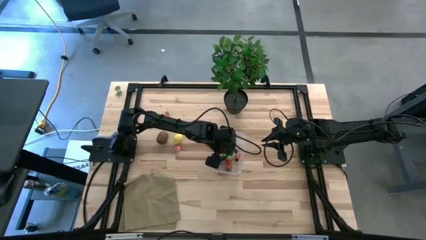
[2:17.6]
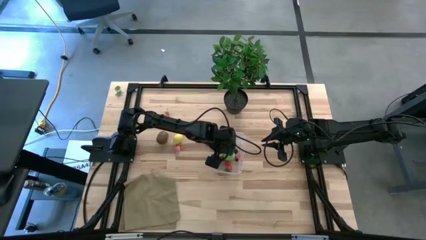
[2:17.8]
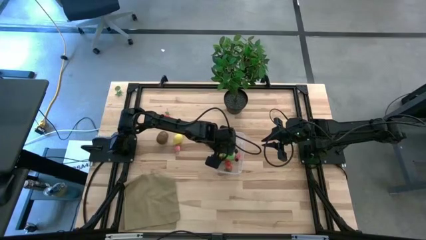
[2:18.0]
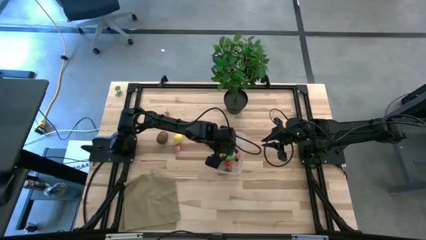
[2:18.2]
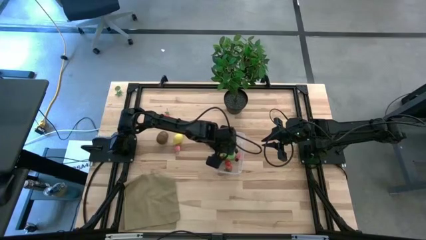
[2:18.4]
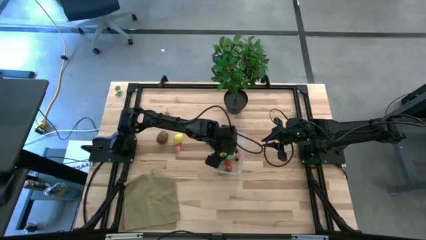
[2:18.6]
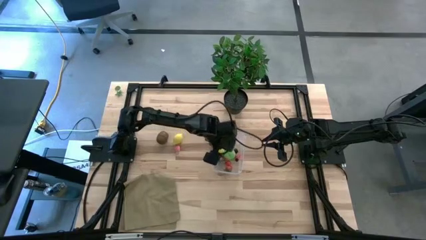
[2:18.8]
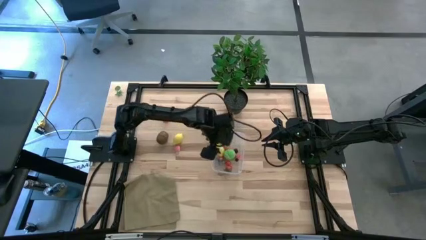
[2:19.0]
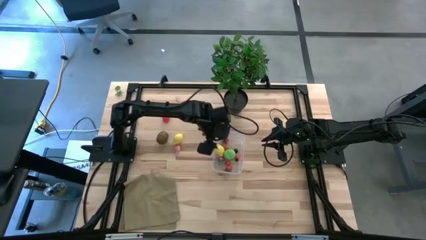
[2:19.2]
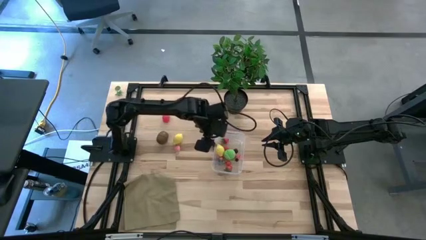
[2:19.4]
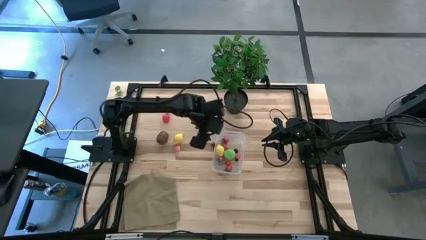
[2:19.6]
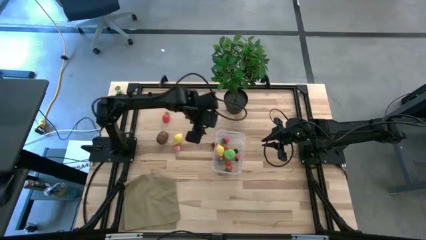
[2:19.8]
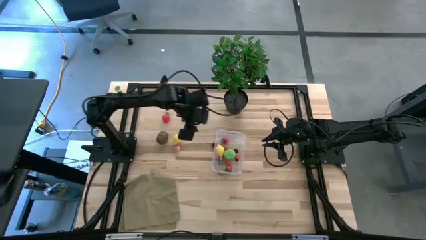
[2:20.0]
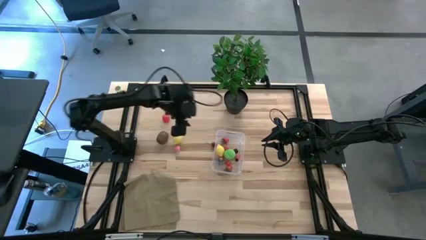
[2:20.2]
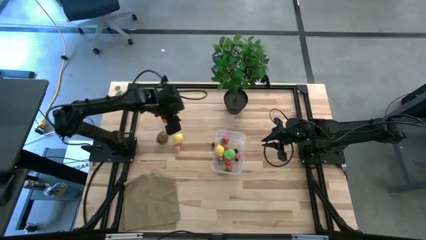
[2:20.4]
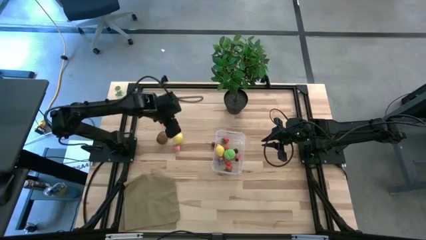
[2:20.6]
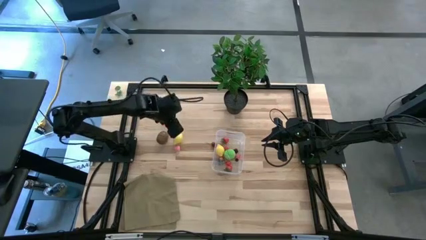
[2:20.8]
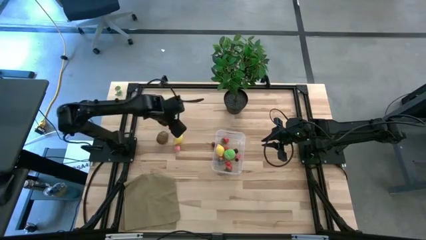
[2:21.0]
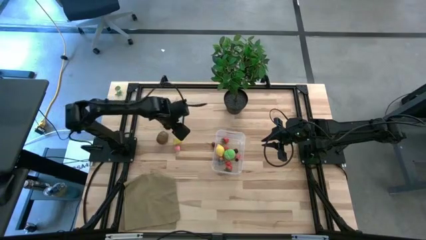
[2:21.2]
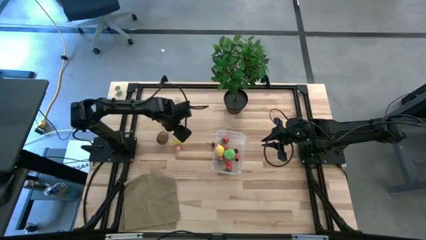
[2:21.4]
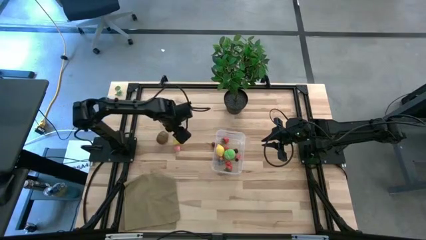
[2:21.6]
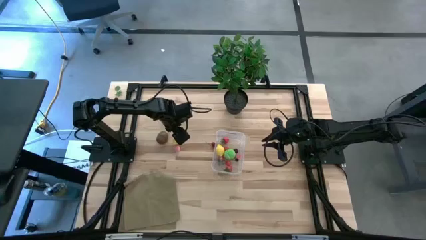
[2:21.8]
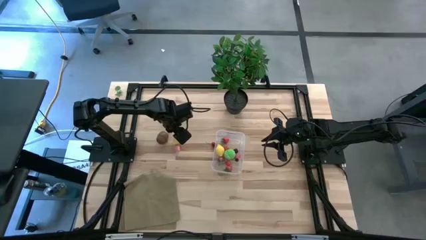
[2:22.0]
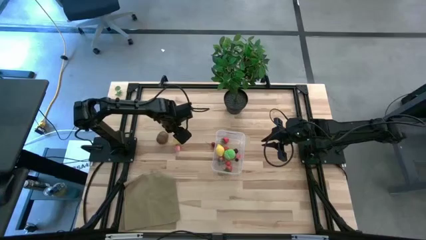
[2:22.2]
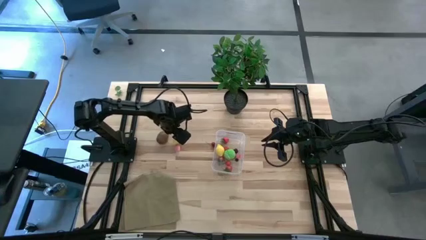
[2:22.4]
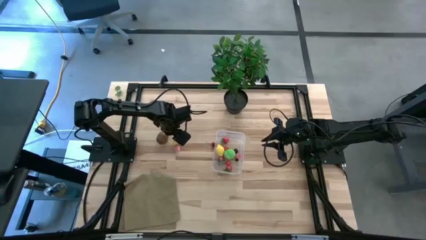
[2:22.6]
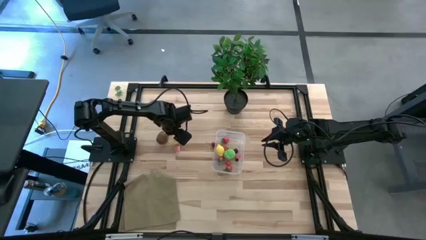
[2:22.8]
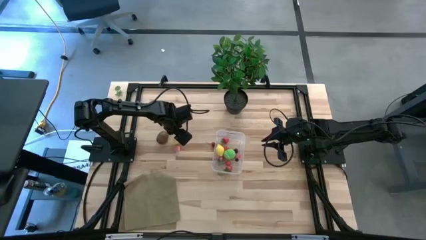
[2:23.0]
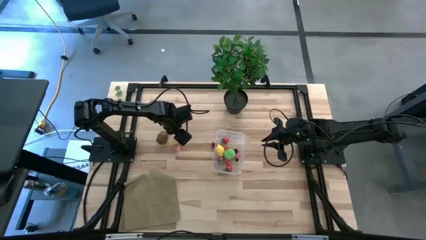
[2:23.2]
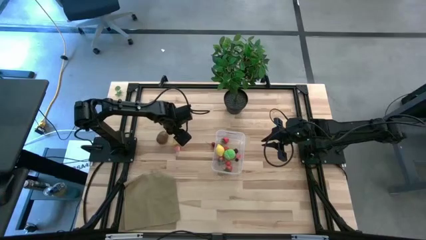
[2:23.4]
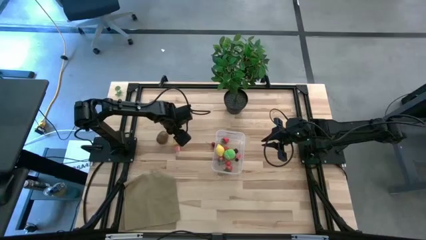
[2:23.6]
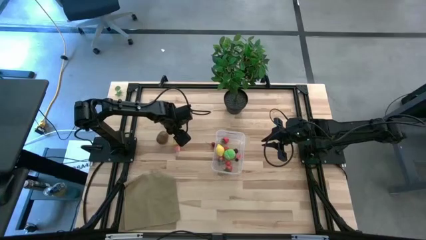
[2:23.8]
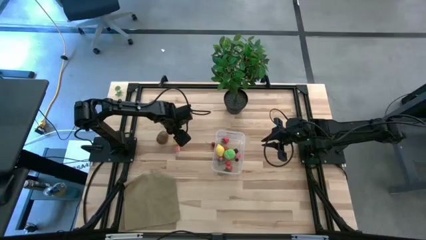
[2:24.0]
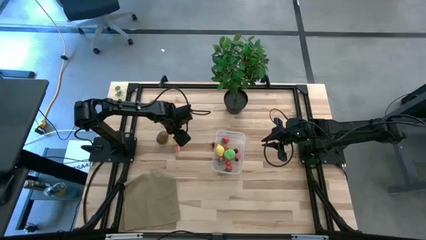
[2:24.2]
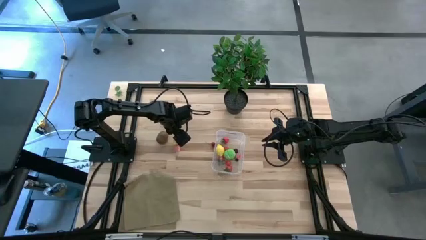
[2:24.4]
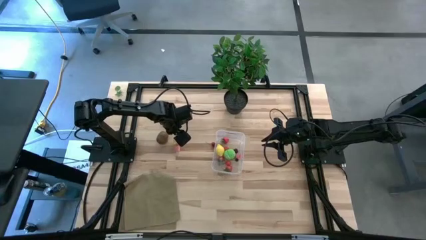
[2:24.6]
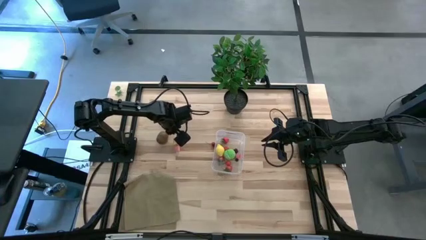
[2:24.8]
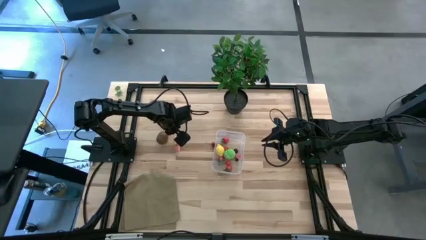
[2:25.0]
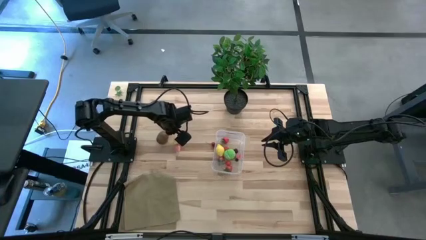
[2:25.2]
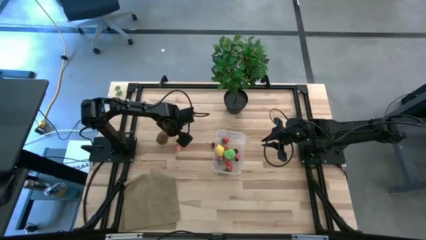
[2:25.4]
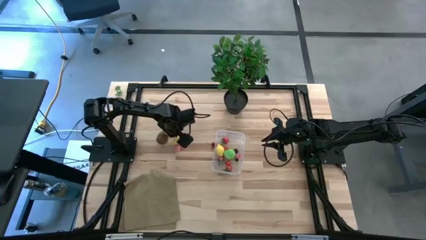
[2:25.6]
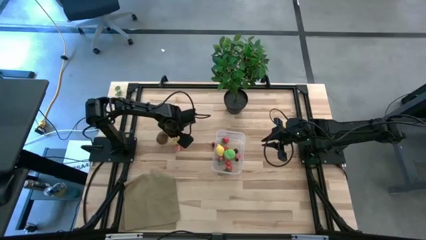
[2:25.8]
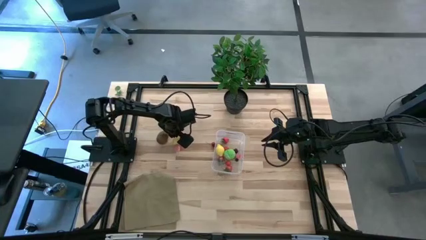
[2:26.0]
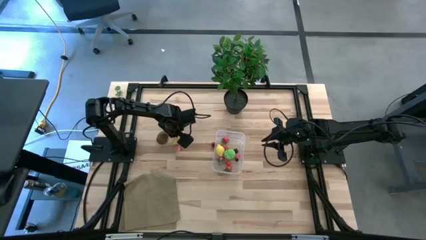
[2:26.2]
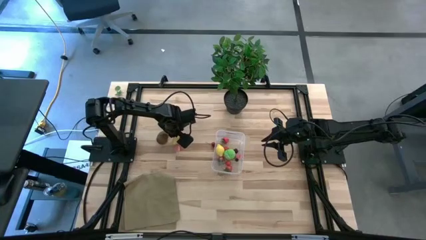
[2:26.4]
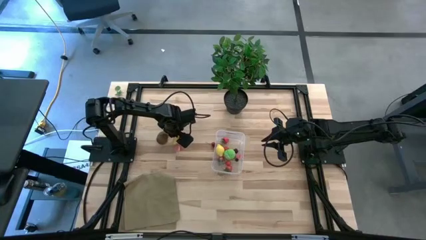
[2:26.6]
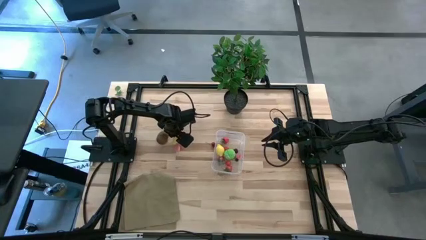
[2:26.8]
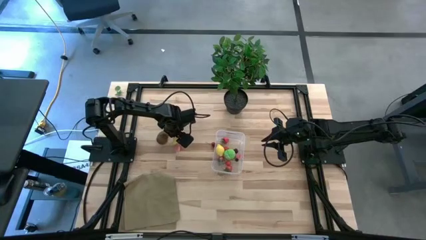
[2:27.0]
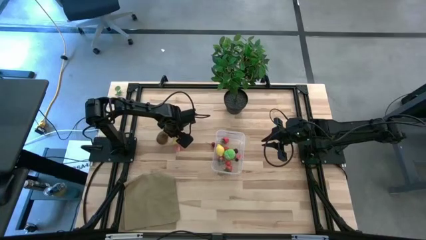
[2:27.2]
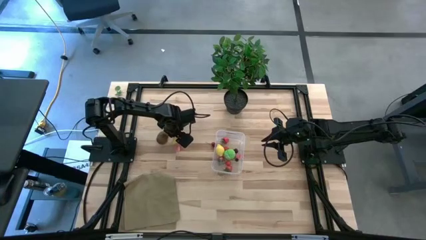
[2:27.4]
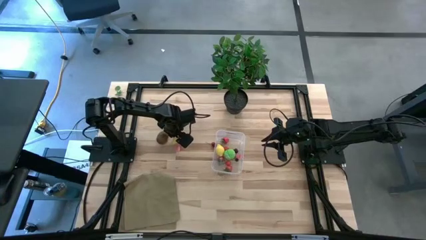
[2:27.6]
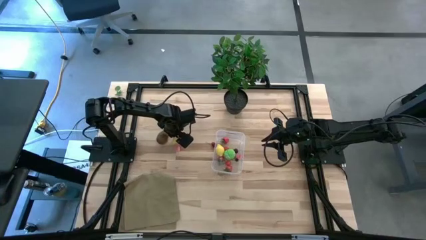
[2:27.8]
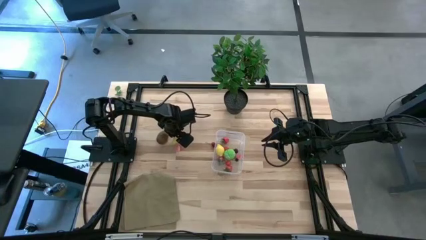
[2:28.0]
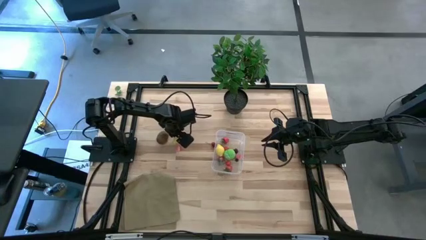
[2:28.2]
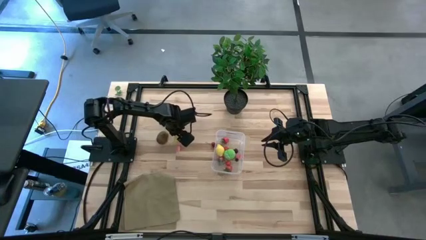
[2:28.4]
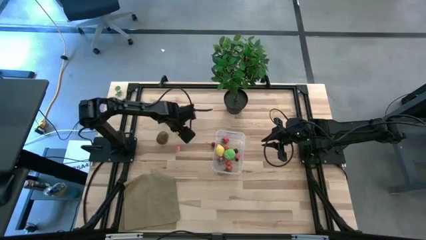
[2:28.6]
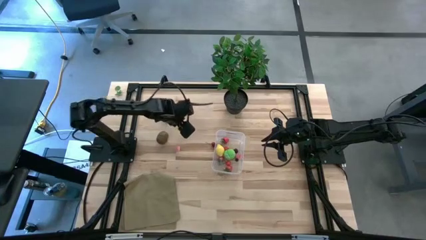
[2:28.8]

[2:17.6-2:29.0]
Task: Pick and placing Produce into tupperware
Put the lemon into the transparent container

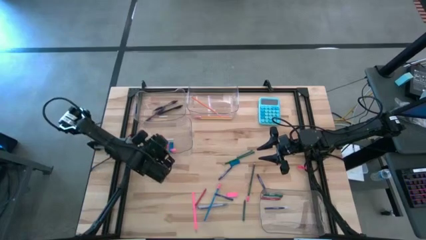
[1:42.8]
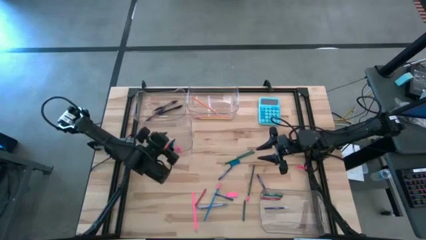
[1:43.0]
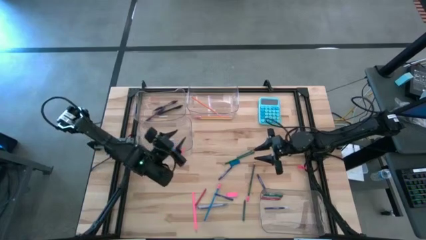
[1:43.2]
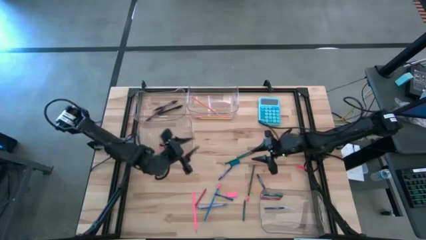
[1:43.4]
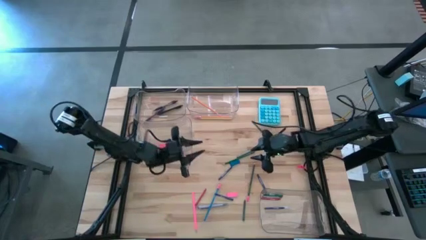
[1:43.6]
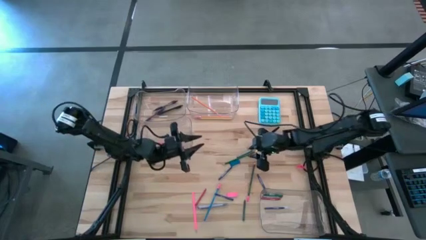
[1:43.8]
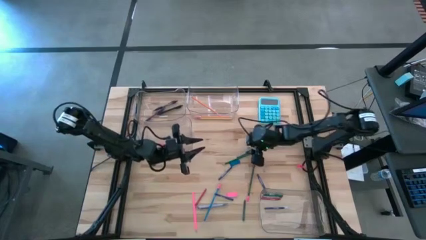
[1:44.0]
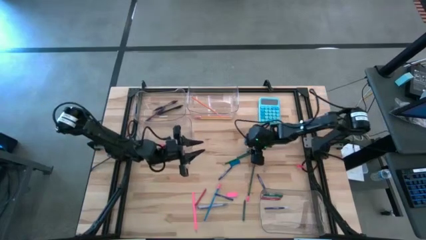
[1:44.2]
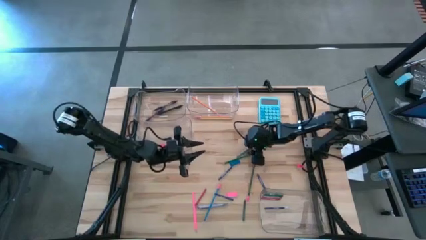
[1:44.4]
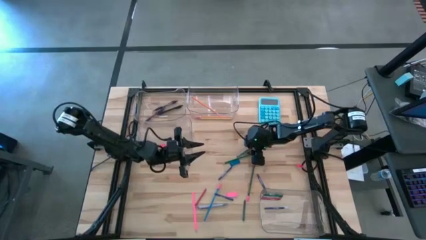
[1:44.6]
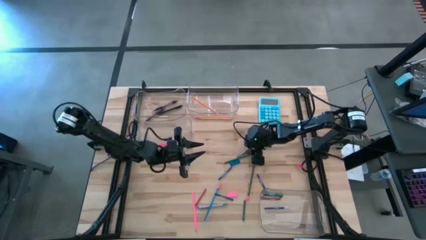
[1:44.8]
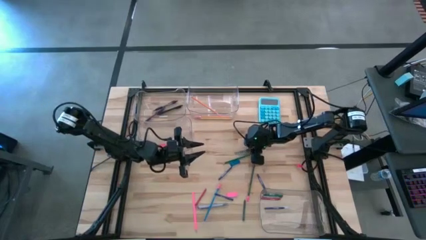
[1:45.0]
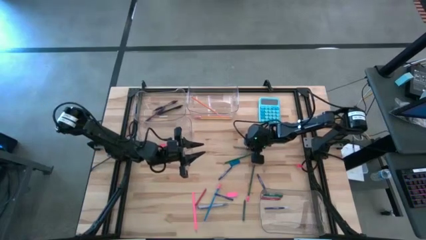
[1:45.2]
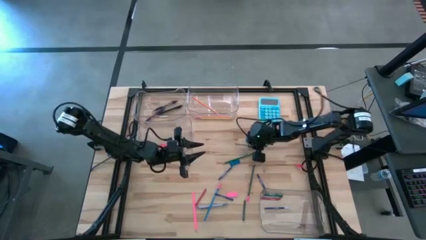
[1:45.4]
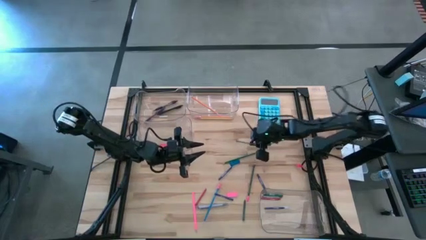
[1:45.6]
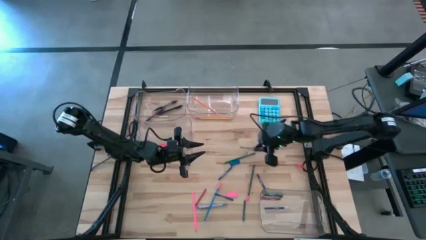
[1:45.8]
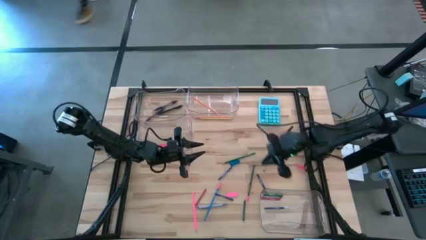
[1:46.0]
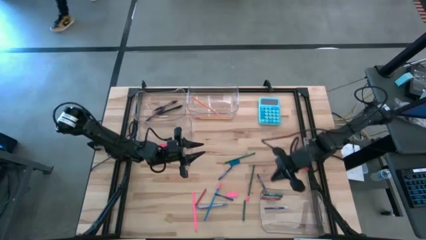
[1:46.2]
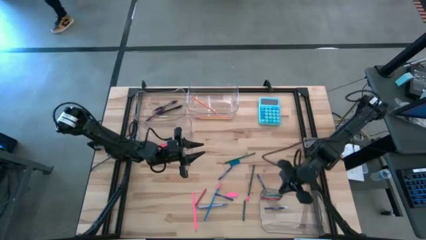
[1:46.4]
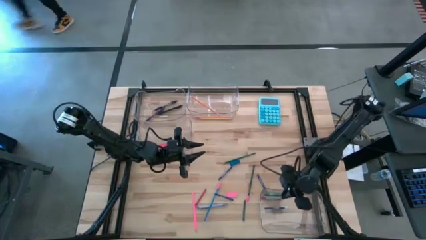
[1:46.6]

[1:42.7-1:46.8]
Task: Sort crayons/erasers/pens/pencils in bins
Put the gray crayon into the bottom right transparent bin

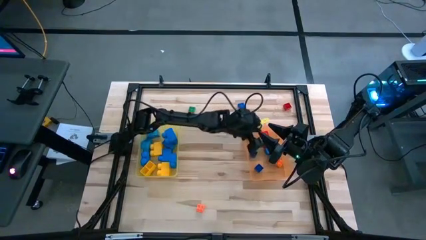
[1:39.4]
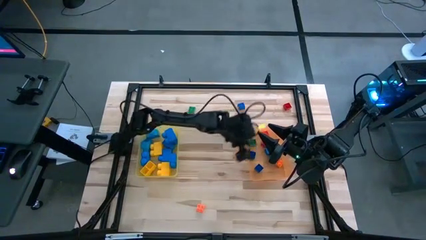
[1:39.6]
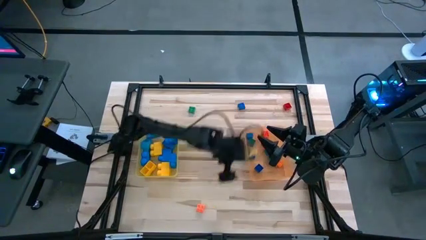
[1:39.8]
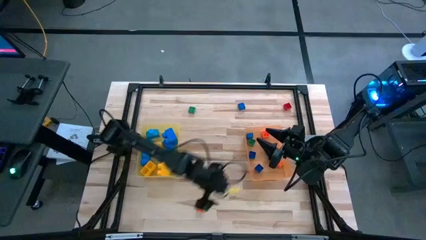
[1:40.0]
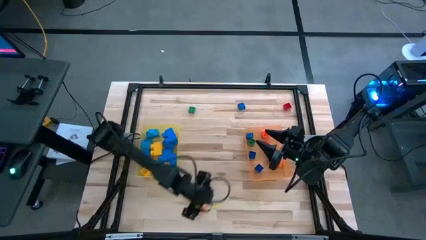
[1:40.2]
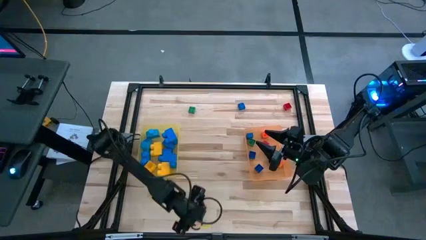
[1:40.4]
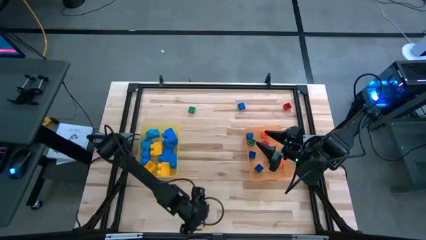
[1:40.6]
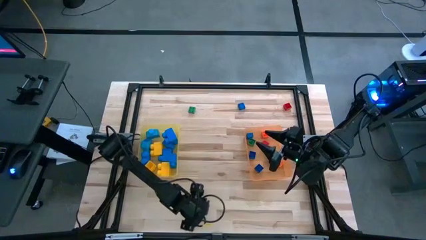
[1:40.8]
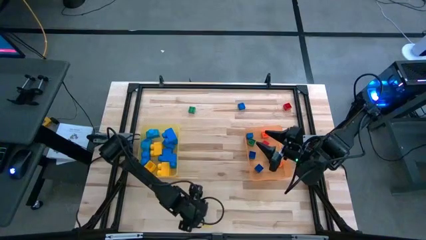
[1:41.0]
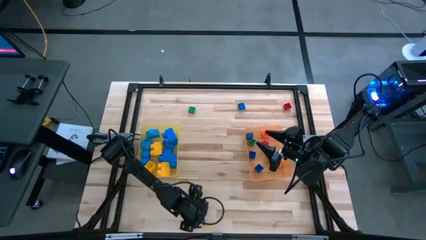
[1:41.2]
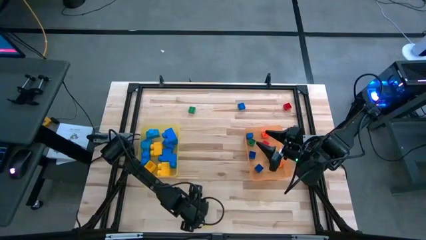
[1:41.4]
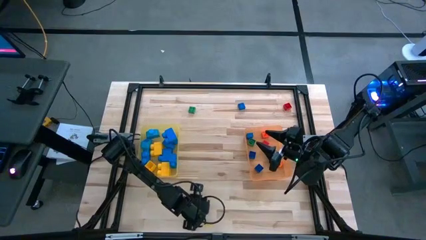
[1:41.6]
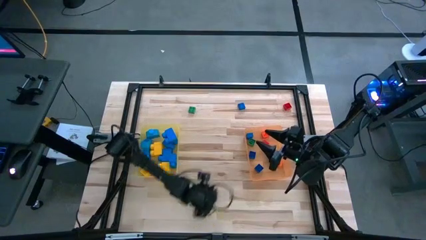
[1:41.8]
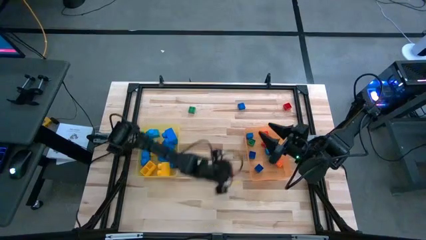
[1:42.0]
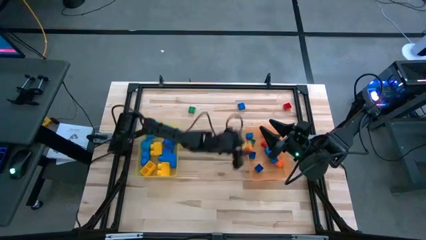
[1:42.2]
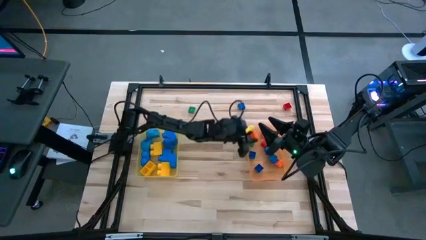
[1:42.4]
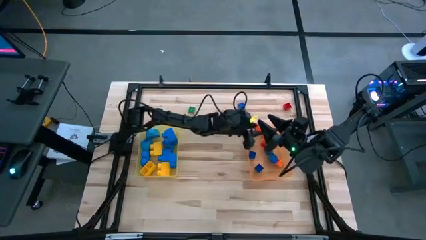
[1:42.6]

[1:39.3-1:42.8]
Task: Sort blocks by size
Put the small orange game piece into the orange bin
